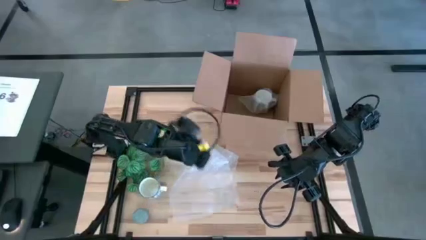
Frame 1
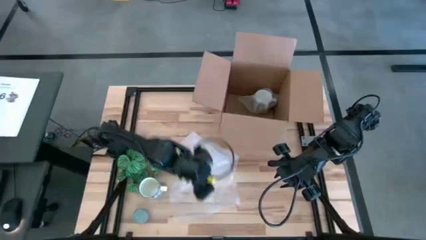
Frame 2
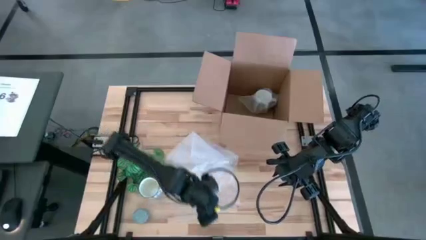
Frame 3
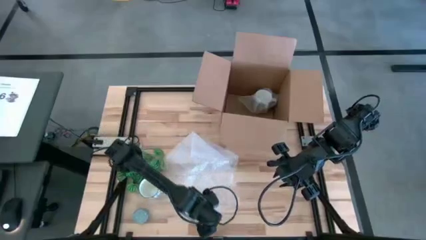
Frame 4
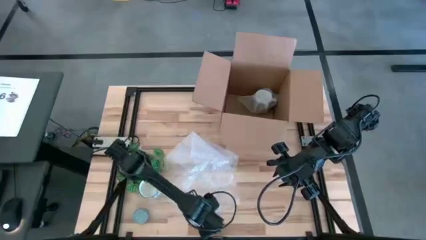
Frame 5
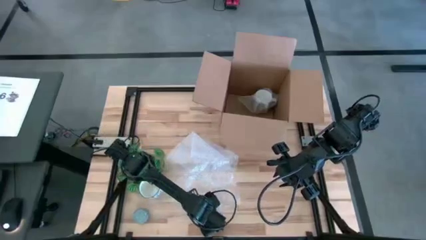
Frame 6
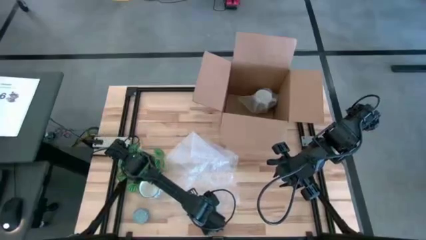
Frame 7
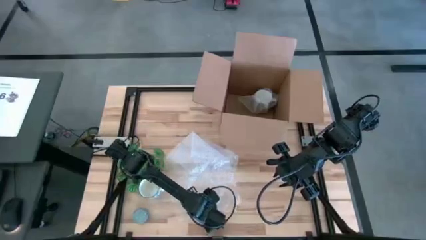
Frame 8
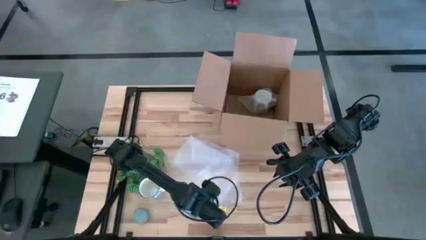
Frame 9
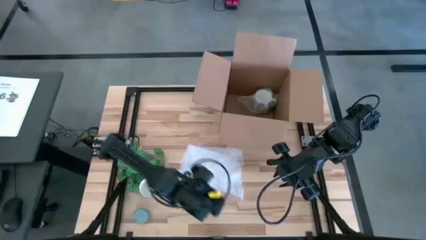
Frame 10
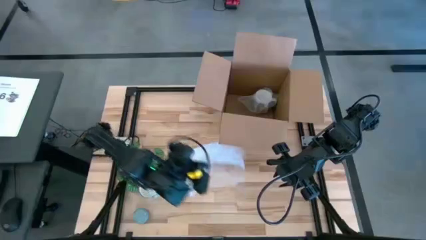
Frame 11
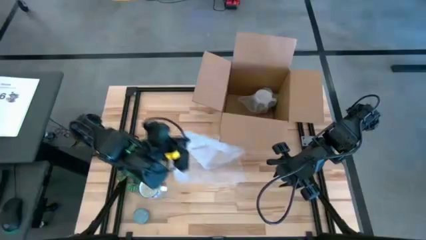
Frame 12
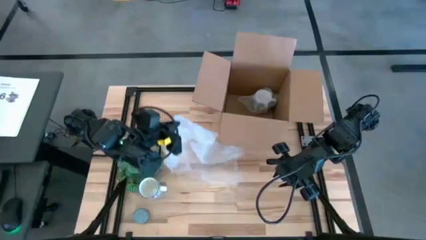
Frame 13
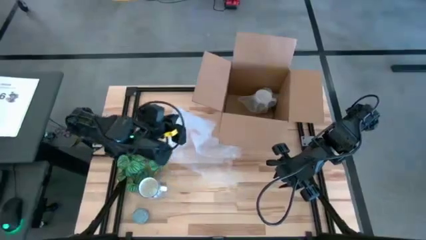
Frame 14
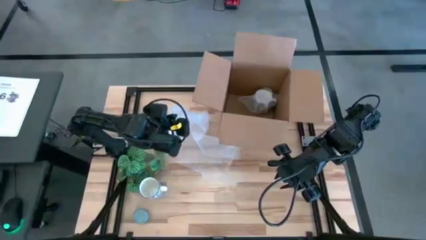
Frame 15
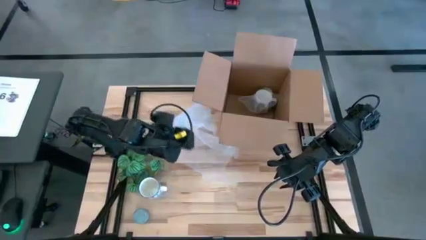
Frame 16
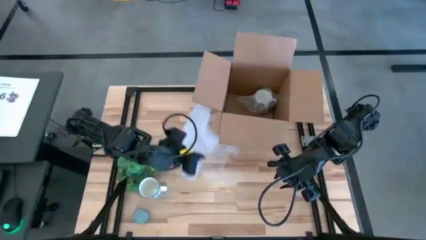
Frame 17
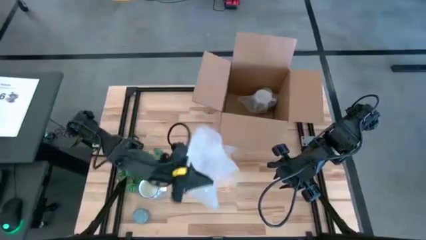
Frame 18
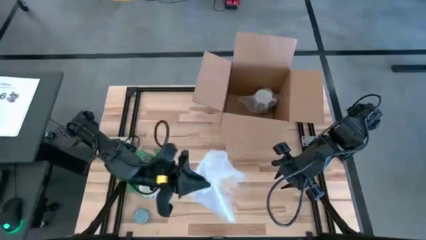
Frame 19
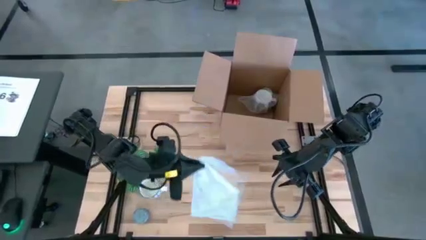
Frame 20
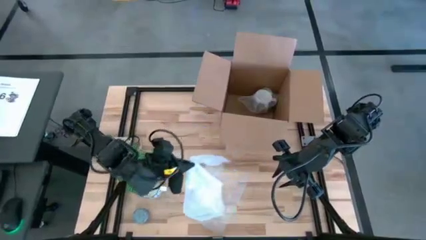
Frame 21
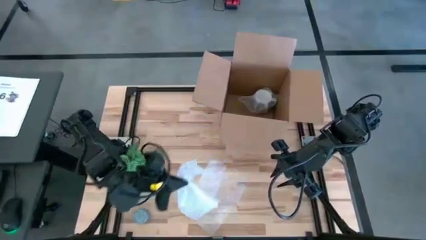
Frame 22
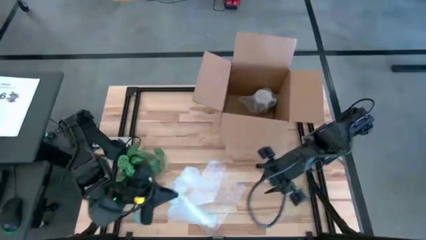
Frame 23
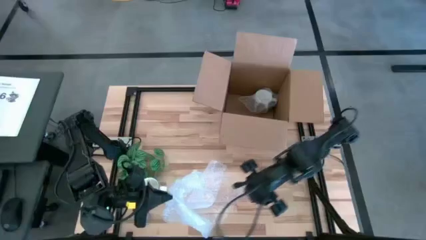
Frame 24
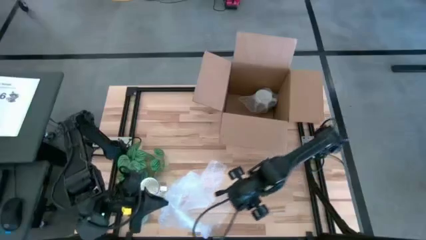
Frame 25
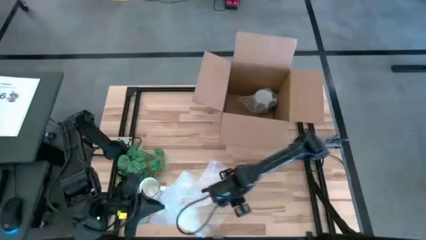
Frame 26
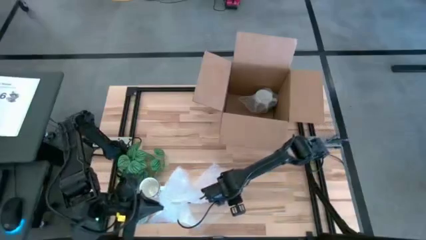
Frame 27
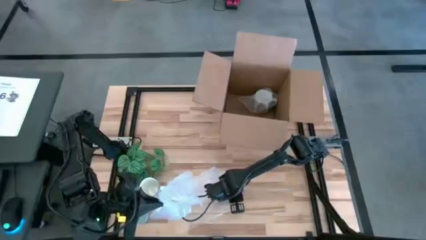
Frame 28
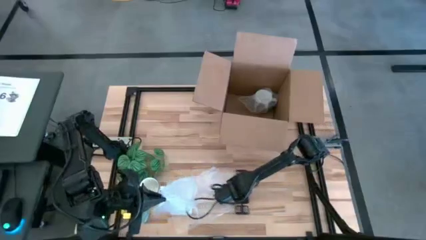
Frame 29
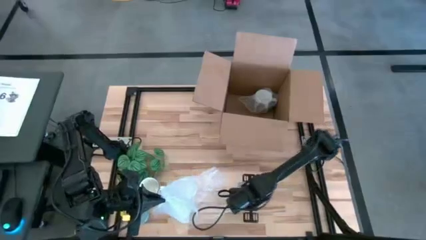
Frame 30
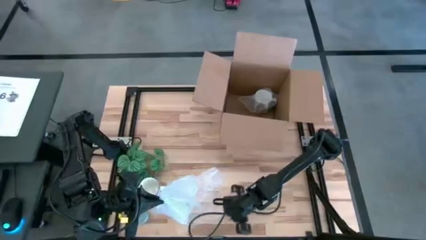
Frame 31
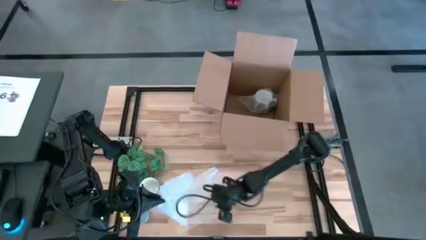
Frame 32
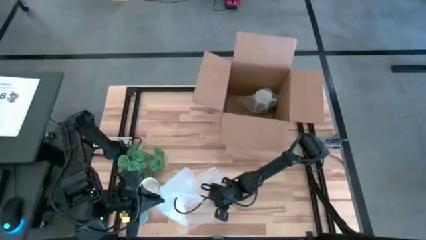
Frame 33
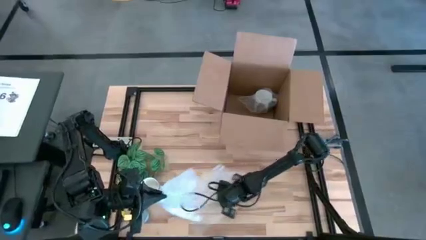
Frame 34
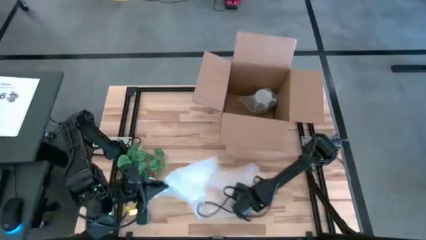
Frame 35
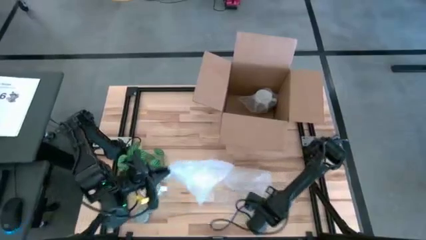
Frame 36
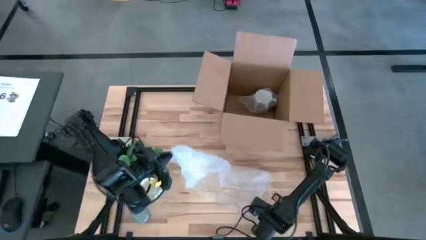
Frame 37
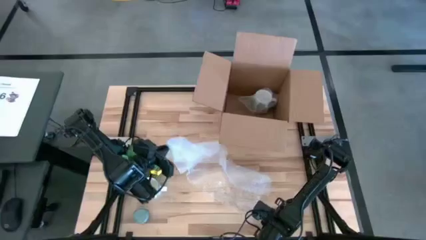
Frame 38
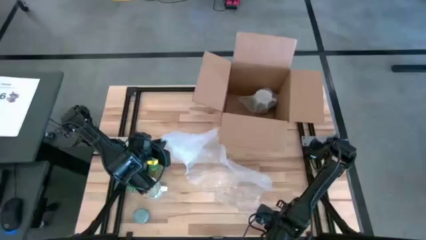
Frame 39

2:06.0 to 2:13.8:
Task: wrap mug
Prepare the bubble wrap

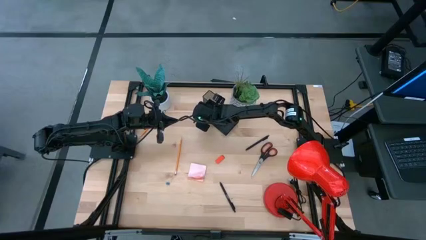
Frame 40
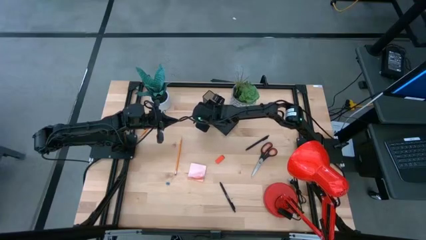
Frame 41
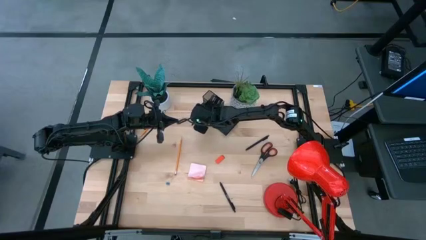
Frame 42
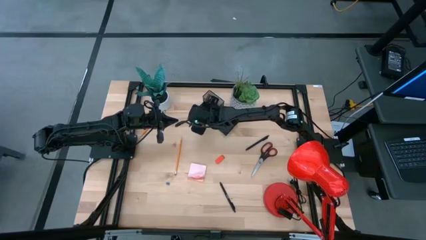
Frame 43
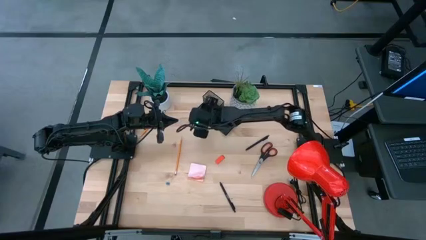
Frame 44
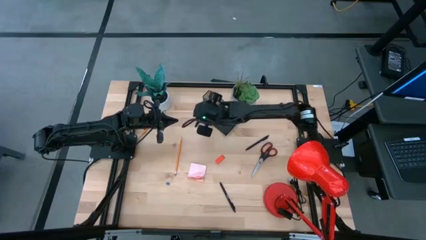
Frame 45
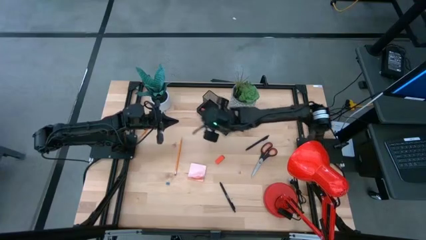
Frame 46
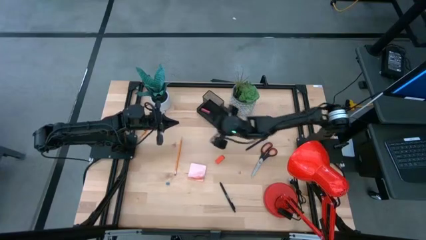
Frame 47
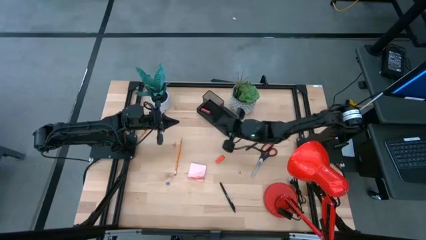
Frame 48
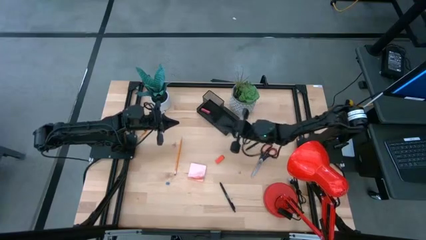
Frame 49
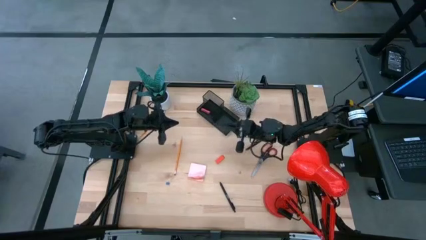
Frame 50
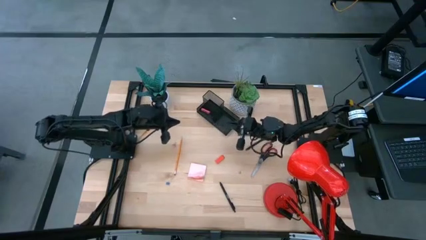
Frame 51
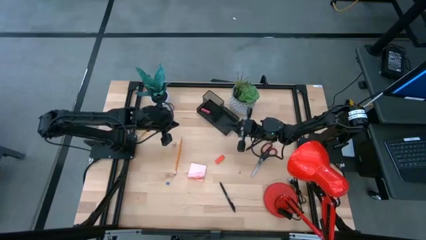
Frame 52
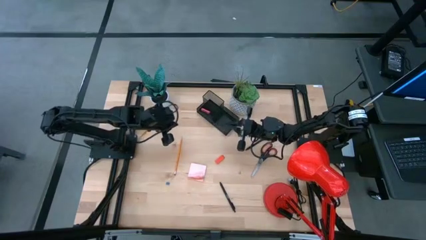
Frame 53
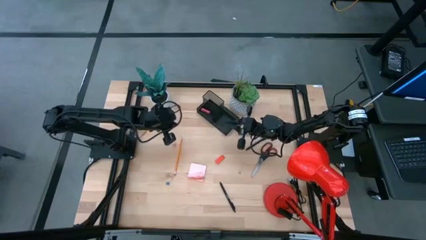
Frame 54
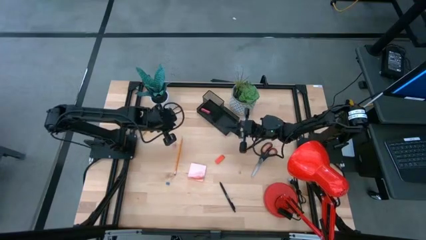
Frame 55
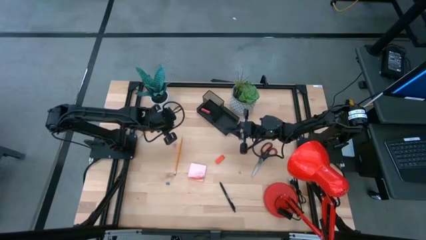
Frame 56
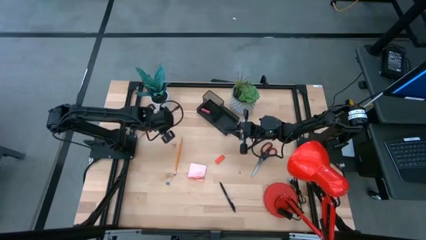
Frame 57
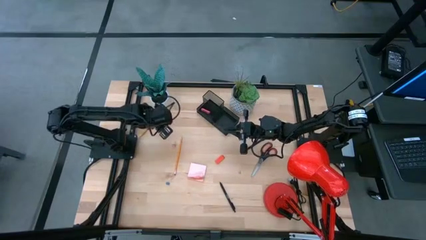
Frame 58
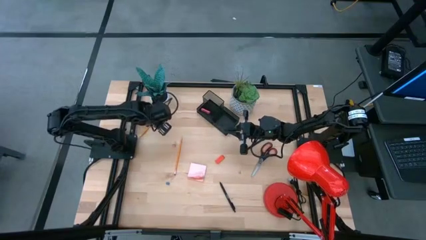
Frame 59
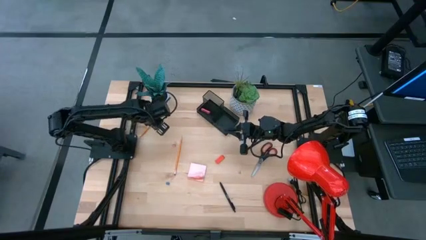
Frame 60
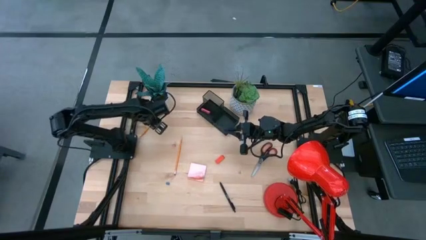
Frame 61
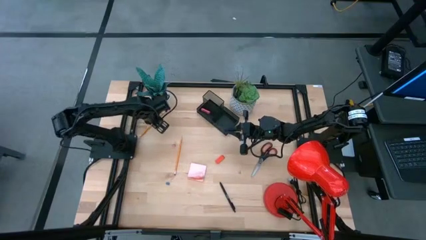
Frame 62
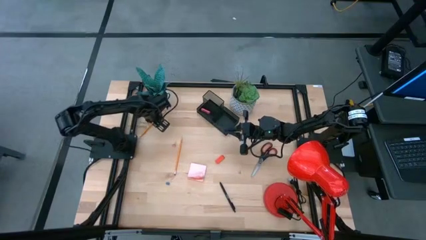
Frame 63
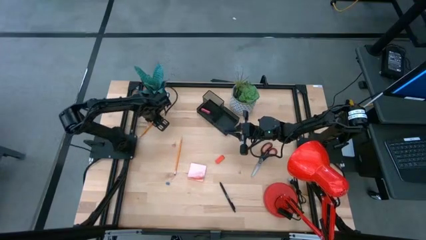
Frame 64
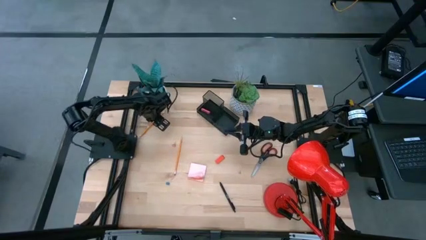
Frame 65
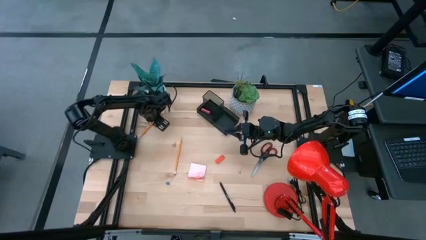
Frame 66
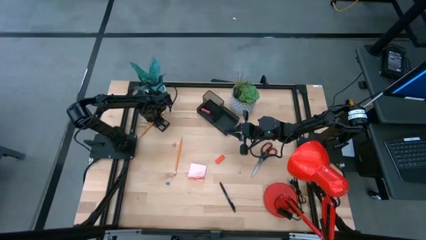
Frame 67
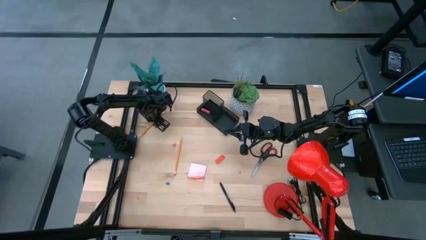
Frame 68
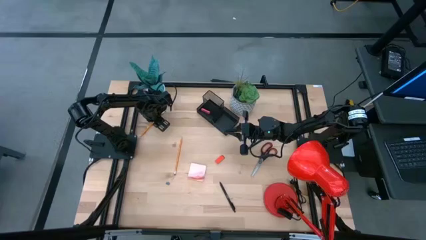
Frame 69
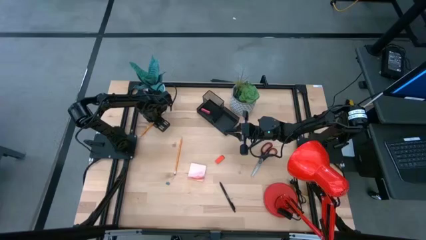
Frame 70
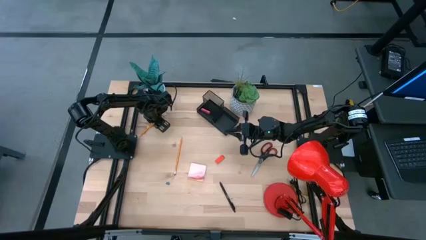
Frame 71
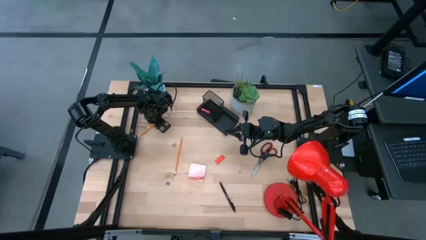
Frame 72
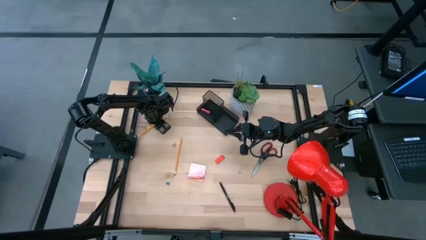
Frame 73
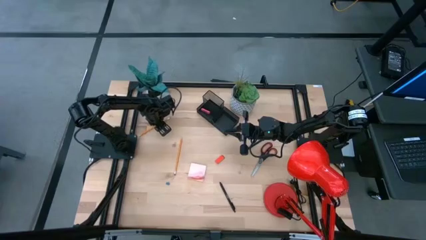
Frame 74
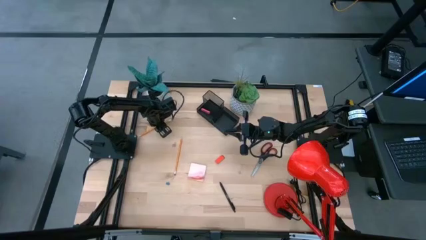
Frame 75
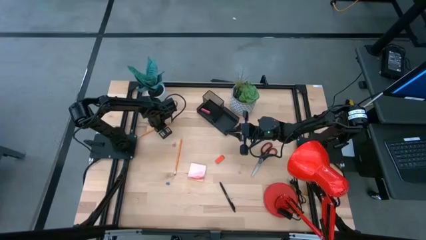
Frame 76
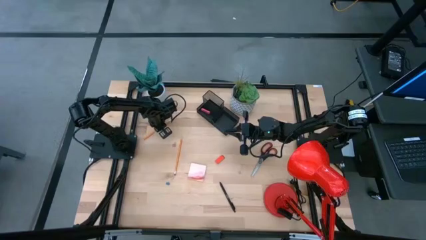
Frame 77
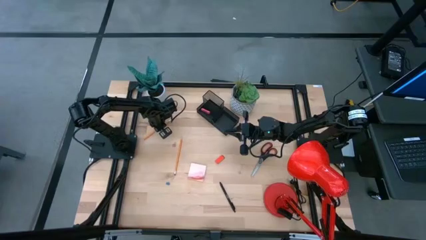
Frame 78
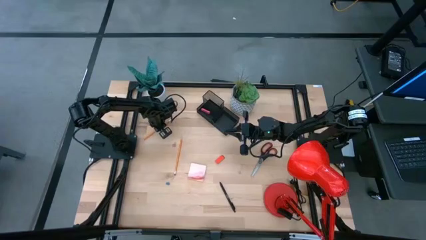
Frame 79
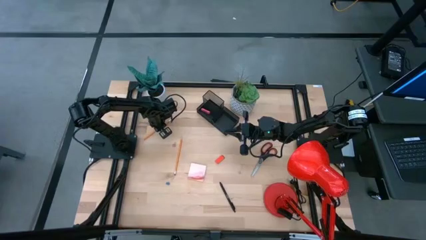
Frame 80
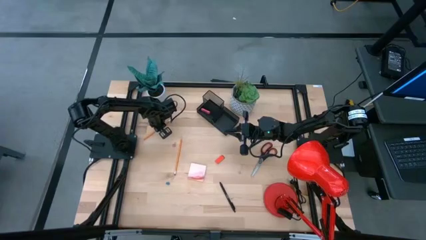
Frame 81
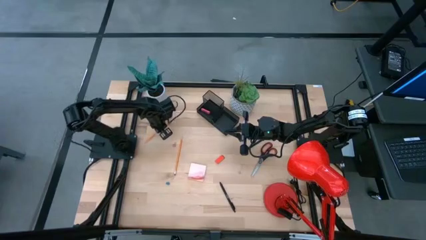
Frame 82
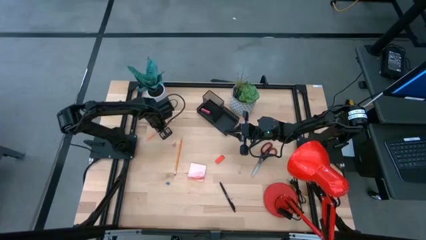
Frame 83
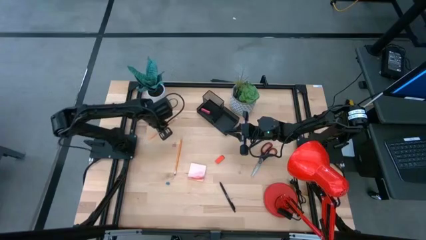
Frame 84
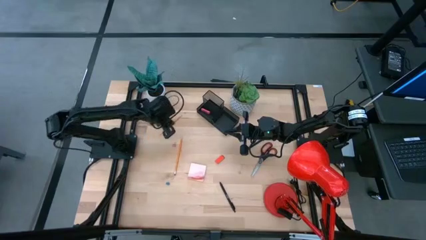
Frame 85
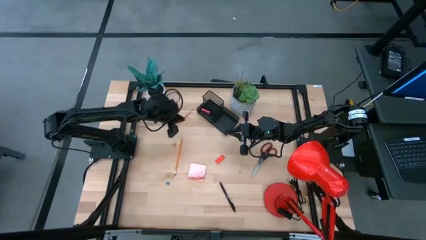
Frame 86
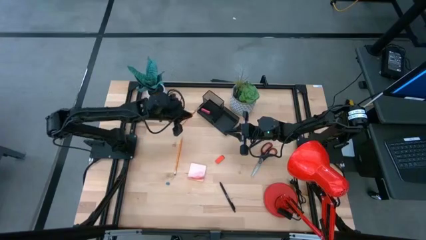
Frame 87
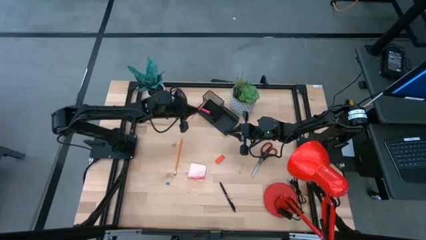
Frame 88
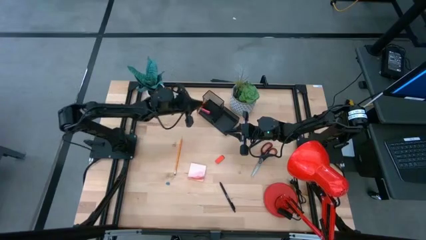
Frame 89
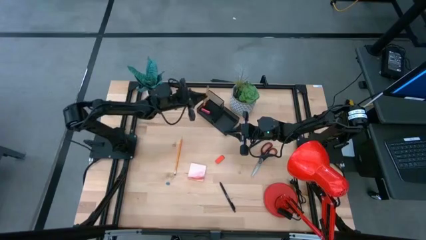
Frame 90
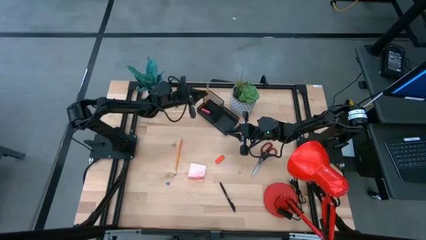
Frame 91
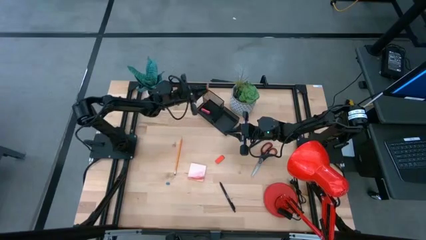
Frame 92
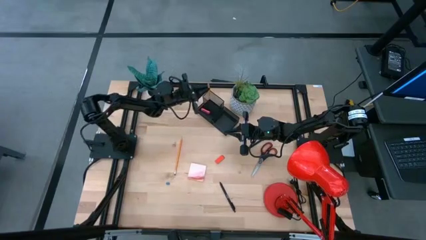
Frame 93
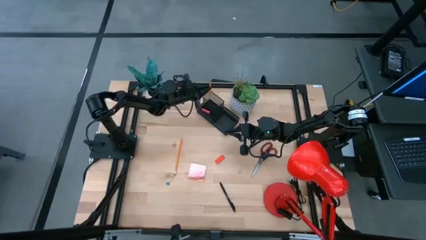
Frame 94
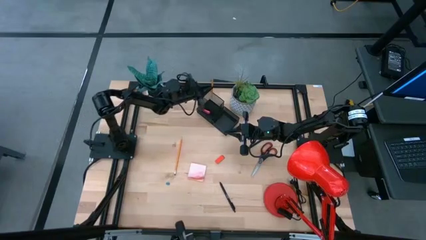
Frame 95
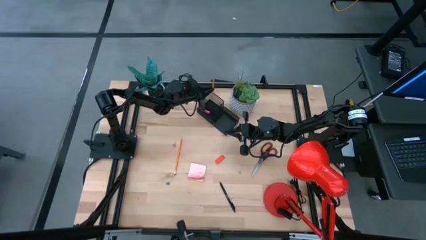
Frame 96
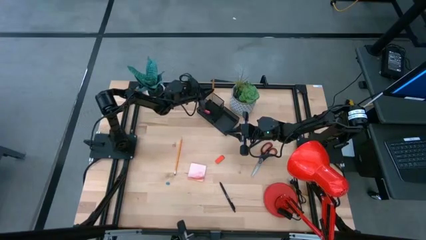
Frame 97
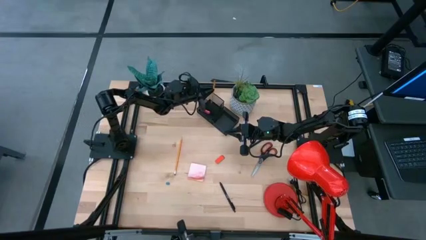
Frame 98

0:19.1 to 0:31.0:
Task: Pick and place office supplies into organizer
Put the orange pencil into the black desk organizer
